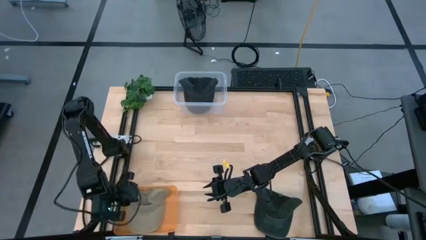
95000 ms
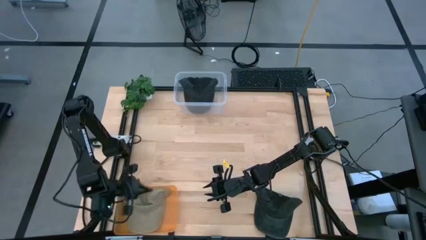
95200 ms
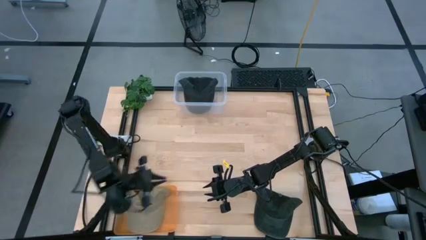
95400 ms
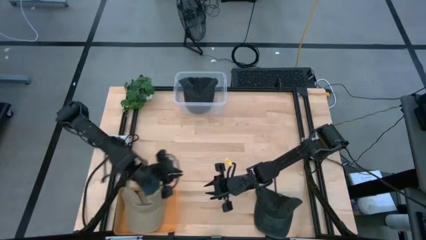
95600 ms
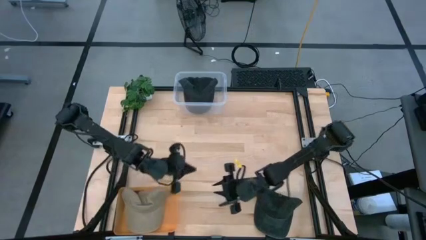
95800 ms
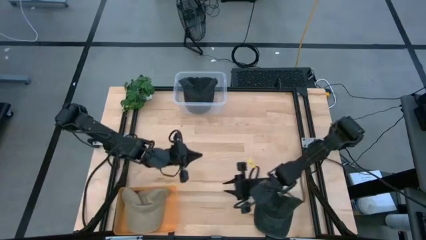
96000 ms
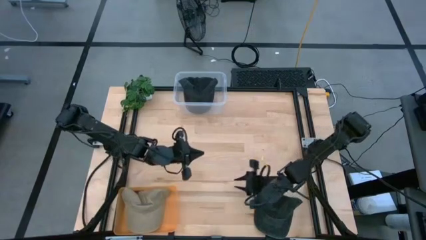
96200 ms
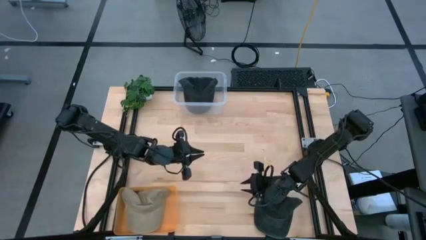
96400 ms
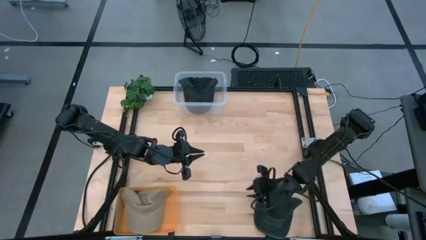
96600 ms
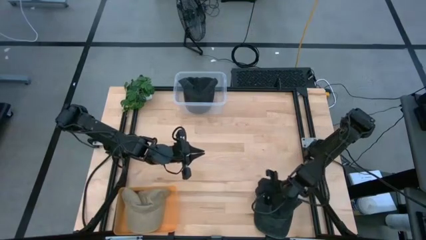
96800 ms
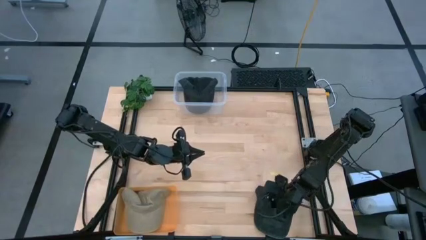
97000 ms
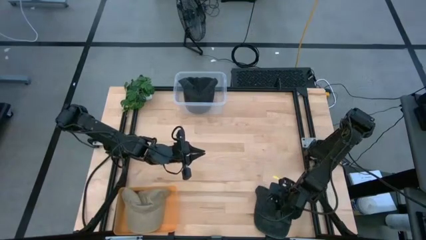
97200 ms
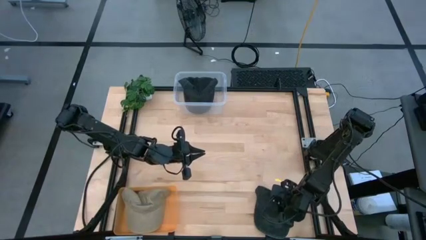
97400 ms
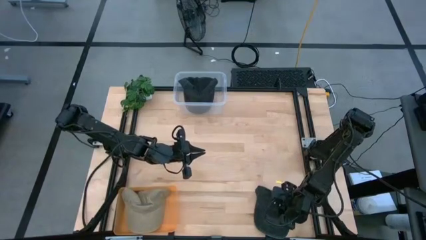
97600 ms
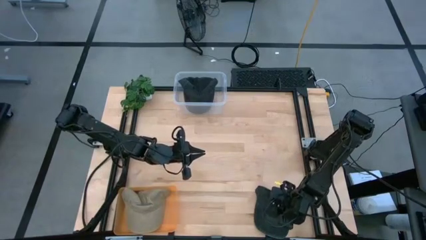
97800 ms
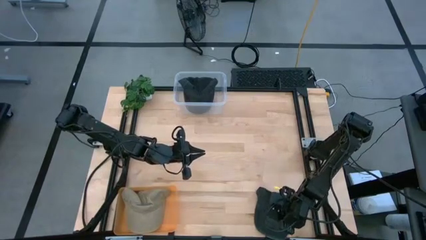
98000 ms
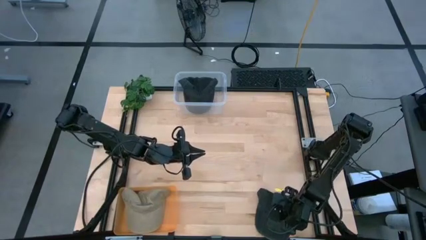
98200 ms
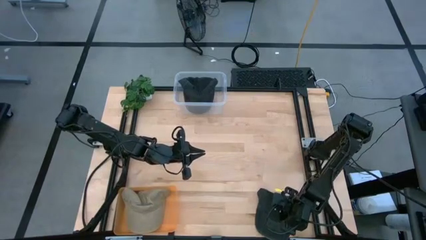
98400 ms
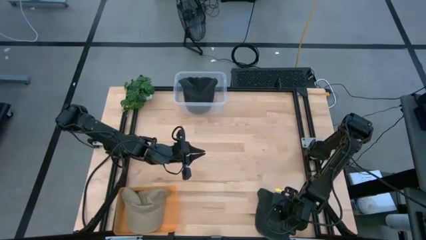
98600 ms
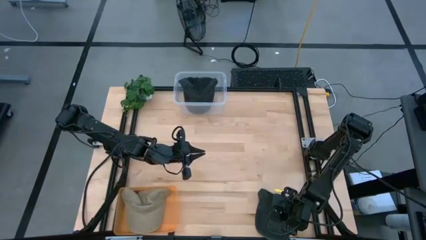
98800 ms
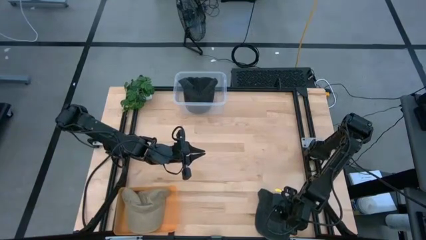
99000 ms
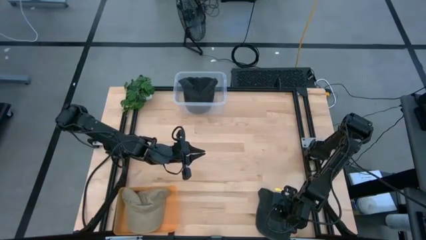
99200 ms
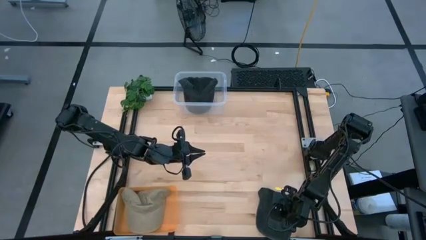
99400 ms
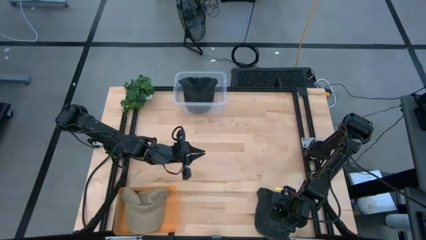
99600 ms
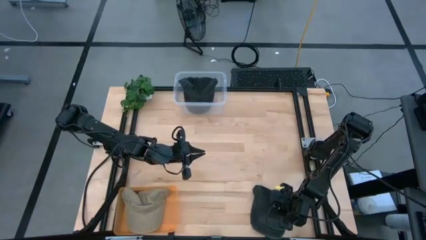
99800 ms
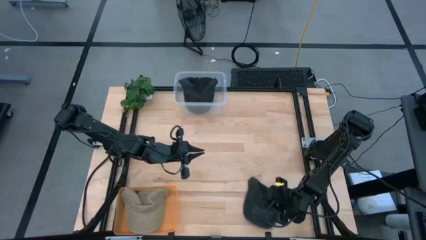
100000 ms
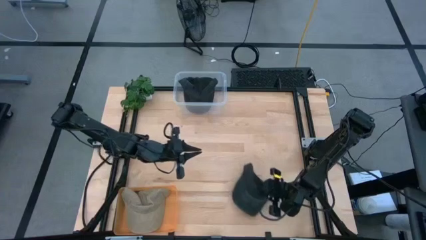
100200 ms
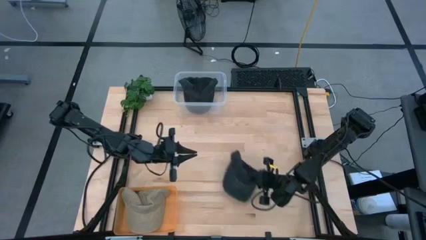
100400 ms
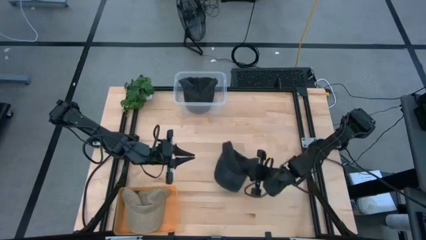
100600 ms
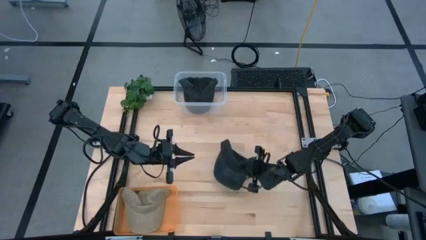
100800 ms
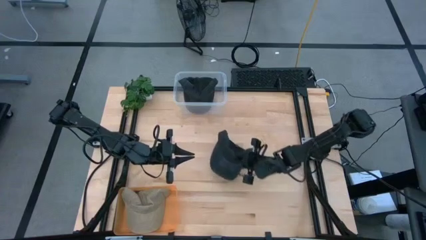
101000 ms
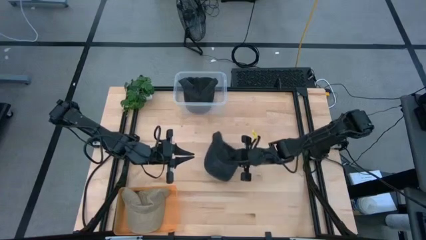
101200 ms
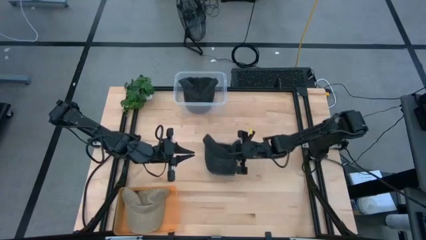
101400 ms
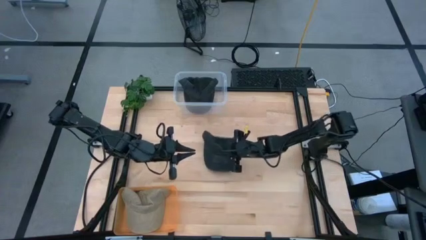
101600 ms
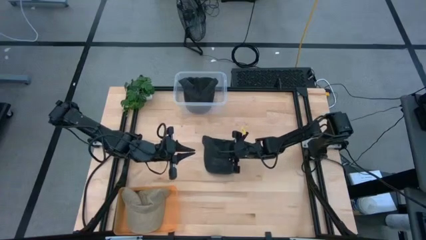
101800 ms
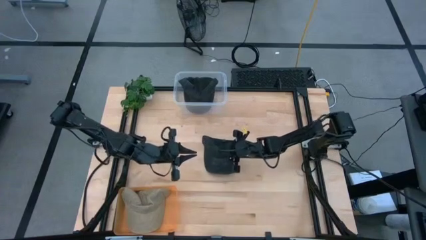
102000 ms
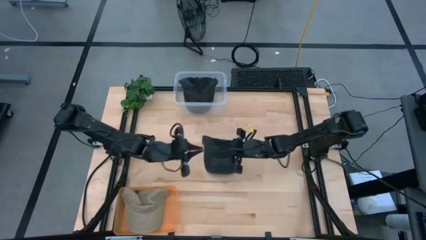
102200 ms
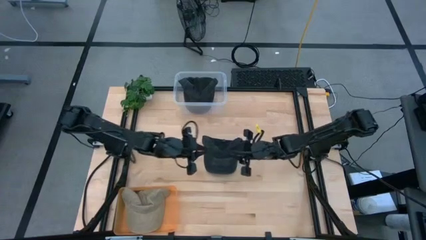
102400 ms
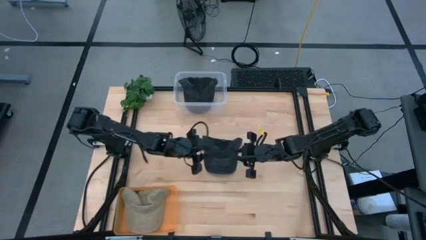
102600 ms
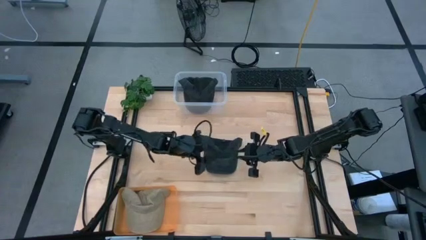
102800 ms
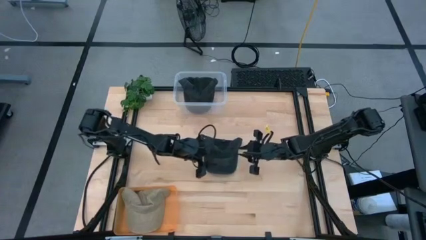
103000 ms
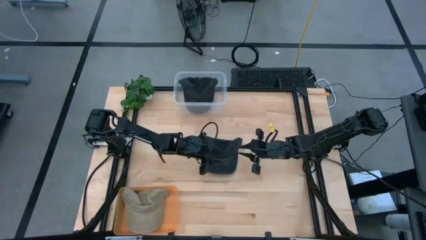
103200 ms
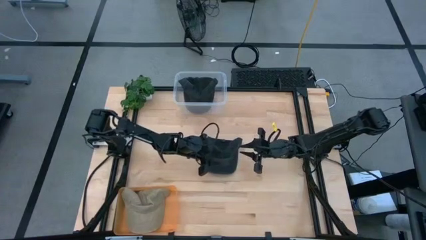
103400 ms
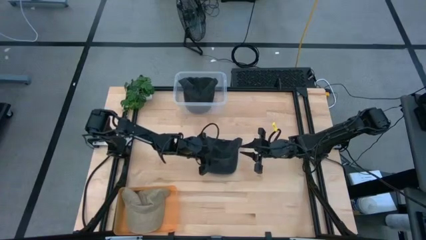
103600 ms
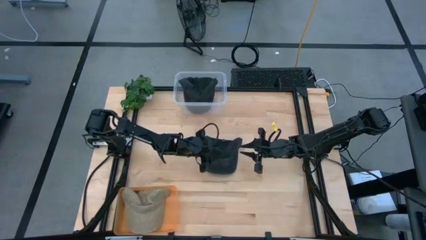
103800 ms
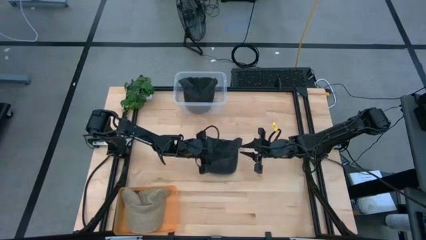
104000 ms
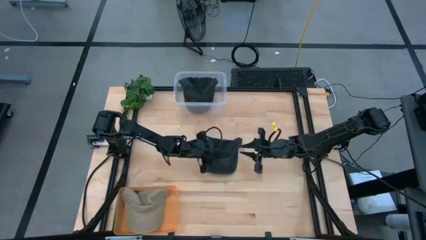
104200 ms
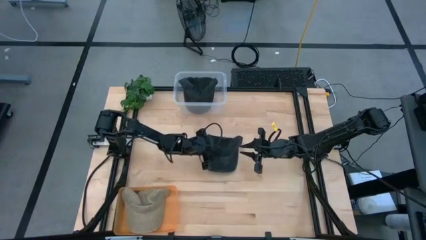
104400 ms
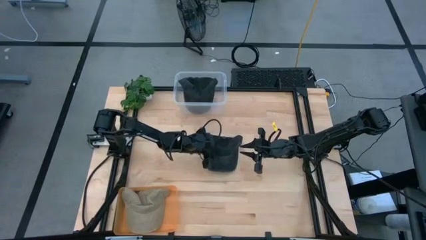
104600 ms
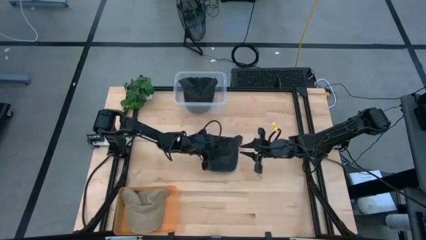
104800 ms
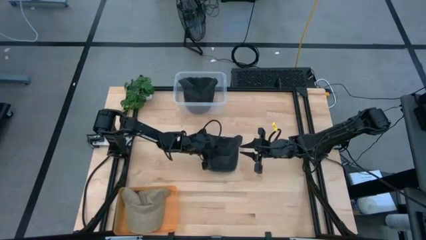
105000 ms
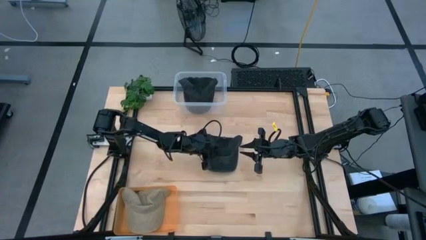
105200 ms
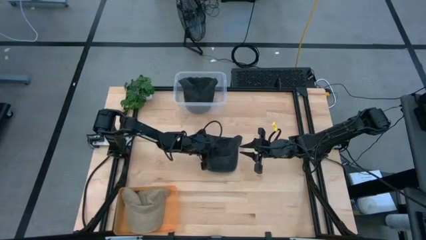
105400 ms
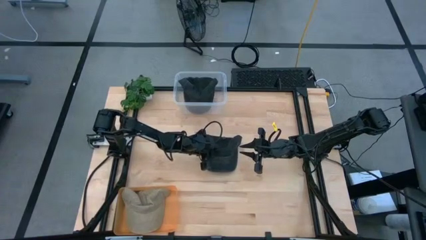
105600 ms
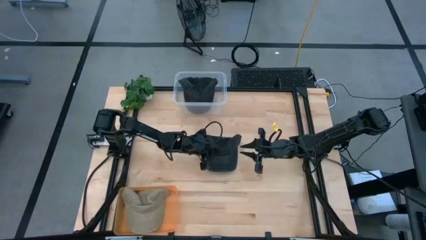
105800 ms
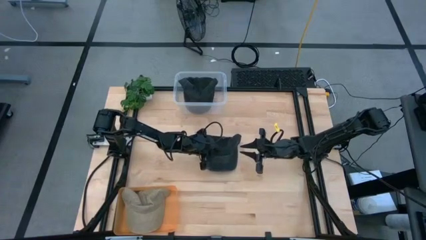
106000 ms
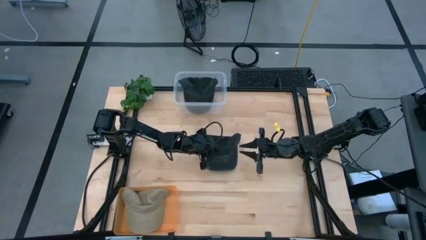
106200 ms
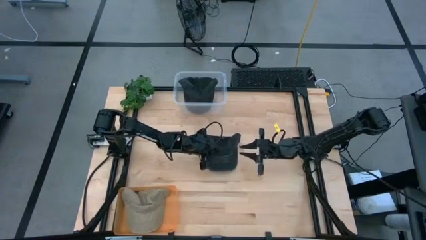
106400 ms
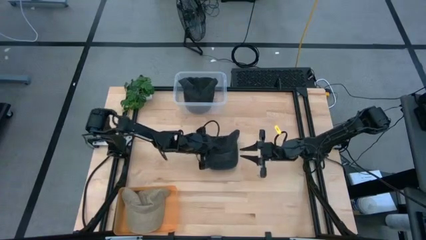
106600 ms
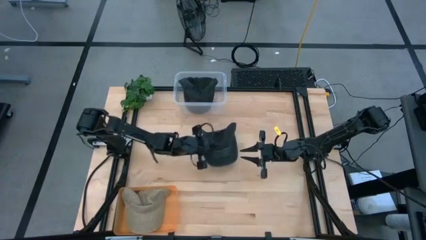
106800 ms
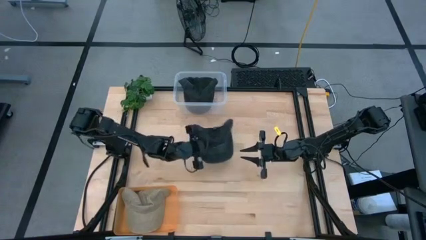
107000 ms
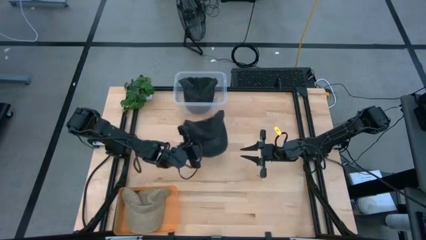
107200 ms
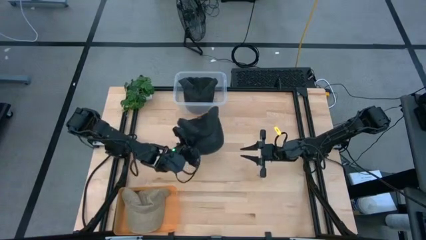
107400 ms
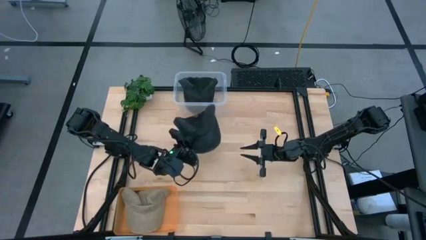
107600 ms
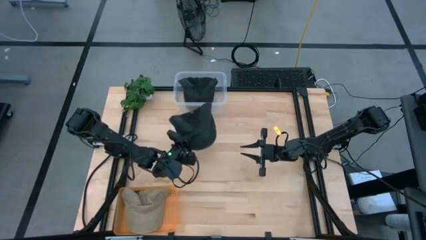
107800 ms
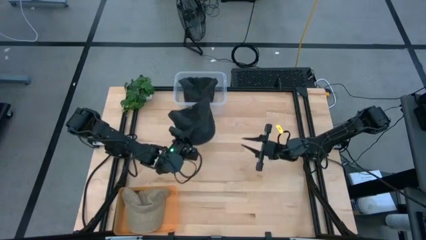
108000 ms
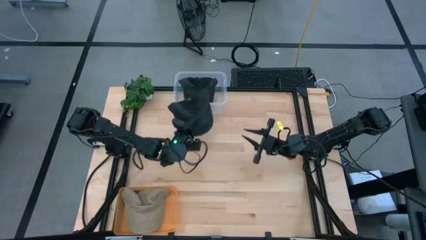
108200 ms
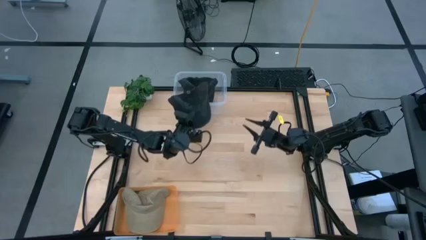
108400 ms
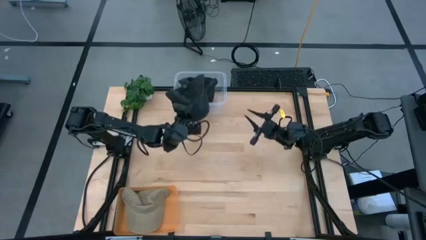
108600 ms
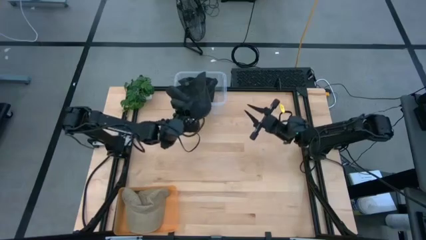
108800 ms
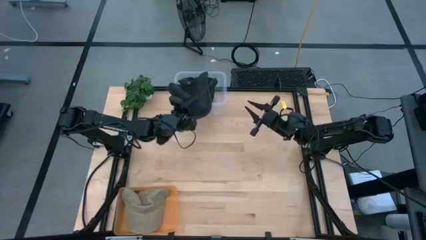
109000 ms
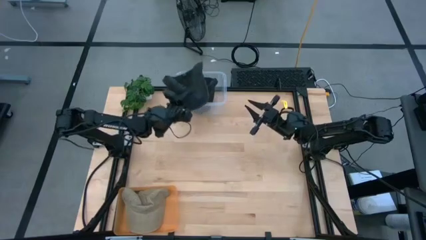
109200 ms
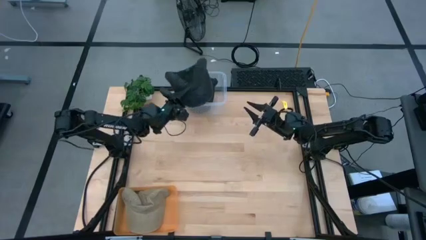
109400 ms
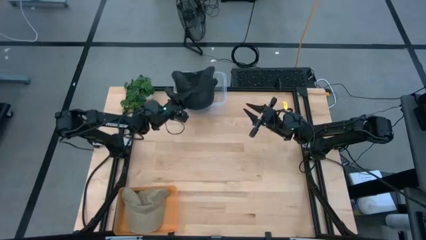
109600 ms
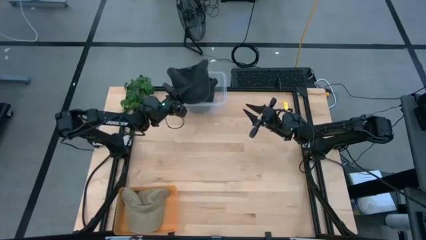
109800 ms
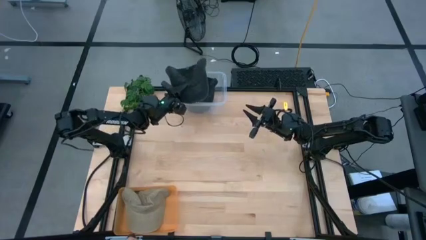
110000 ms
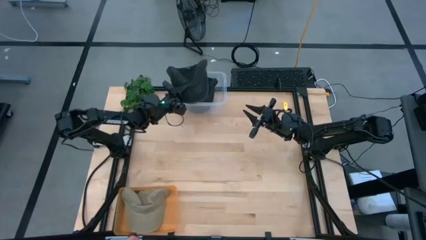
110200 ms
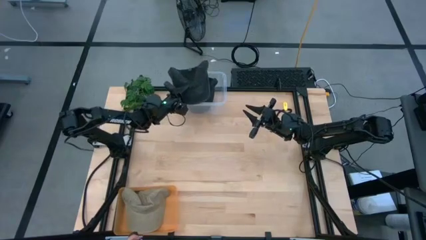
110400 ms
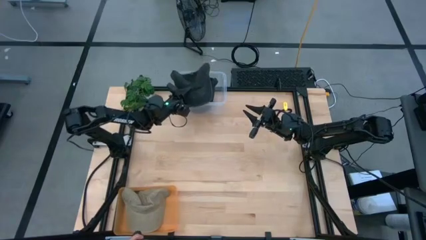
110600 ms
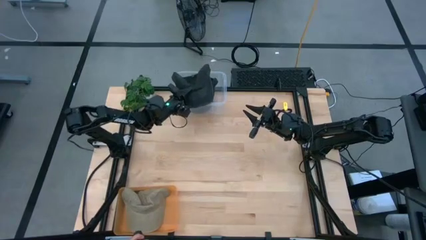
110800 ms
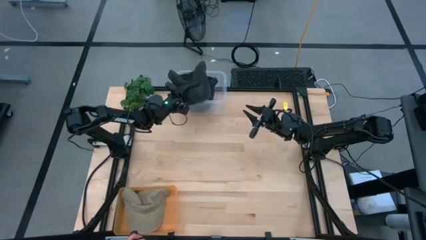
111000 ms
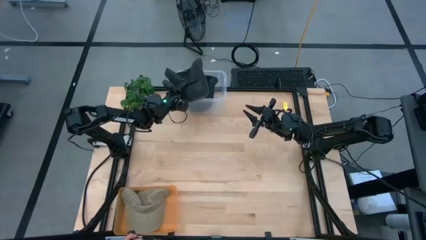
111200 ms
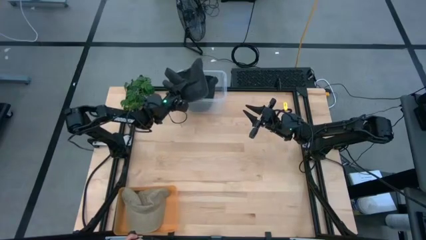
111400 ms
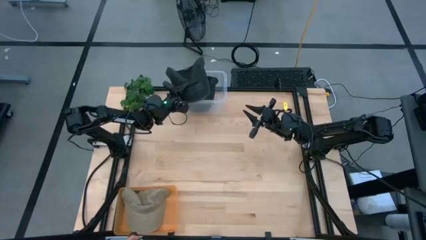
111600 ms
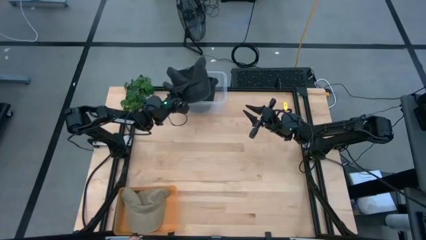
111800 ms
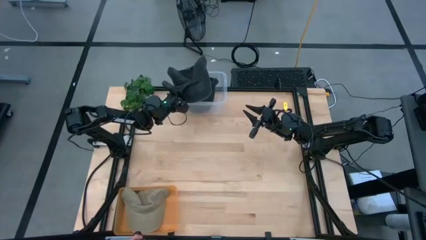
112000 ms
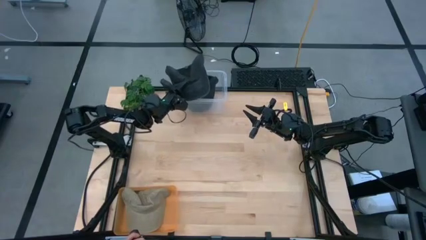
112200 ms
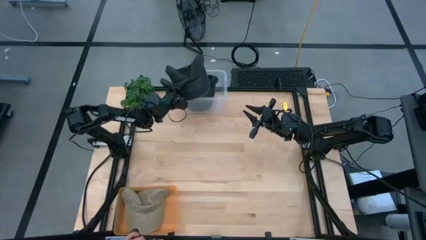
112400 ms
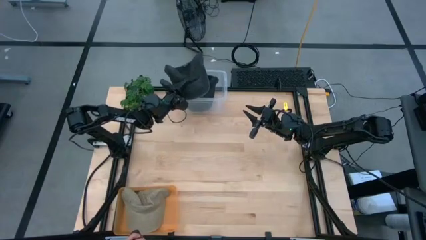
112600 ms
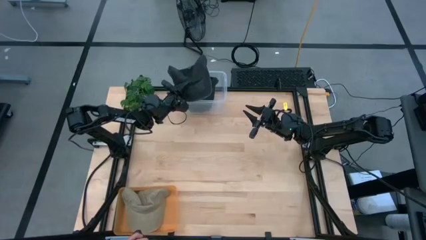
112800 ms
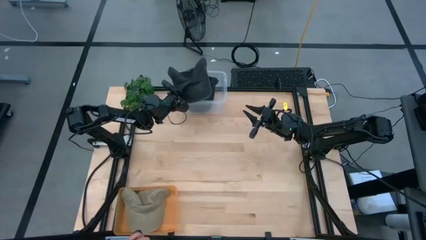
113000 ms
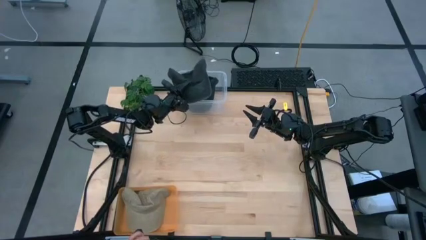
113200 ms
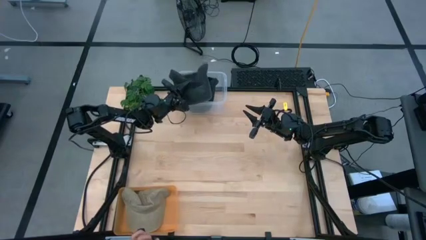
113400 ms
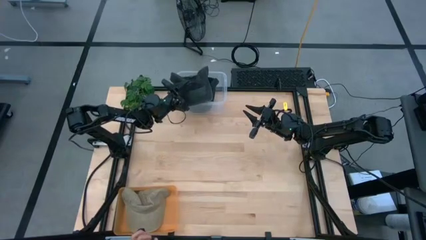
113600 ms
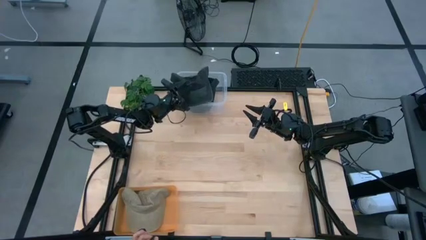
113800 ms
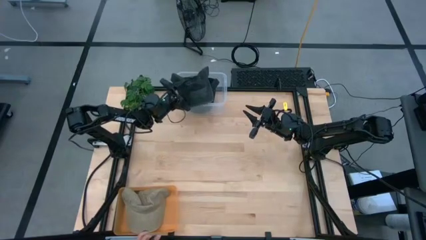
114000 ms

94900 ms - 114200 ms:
Task: Pick & Place hat
Put the black cap into the transparent bin
